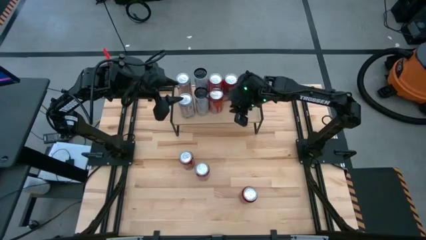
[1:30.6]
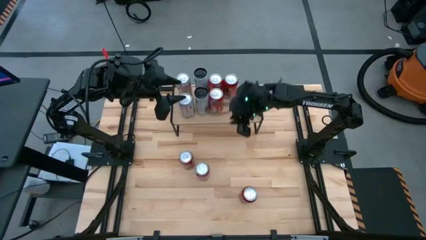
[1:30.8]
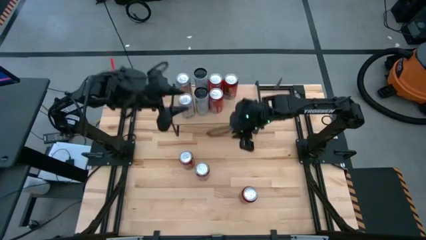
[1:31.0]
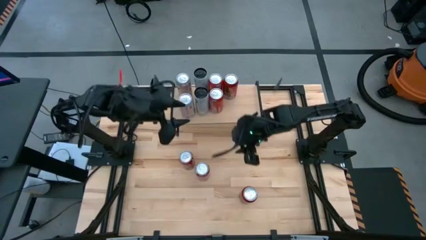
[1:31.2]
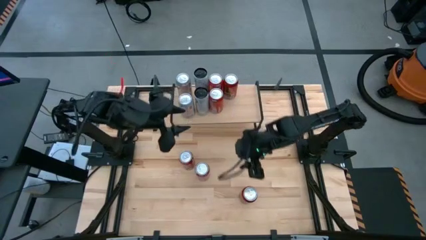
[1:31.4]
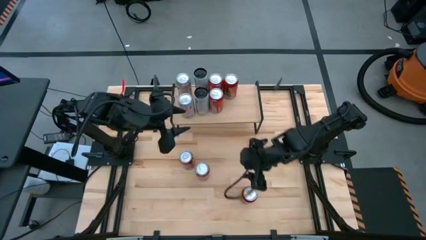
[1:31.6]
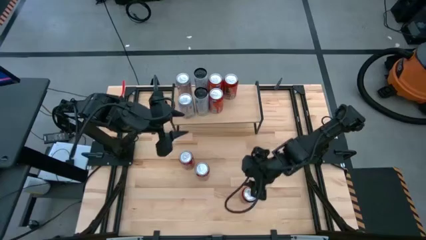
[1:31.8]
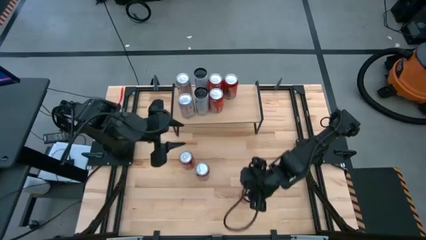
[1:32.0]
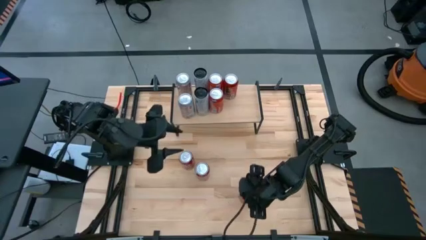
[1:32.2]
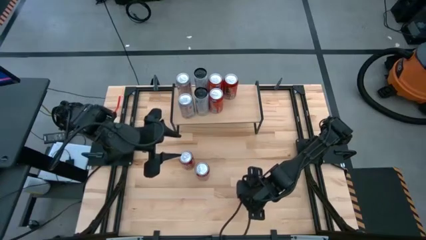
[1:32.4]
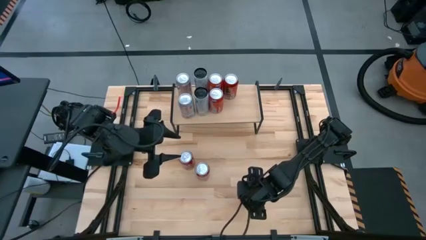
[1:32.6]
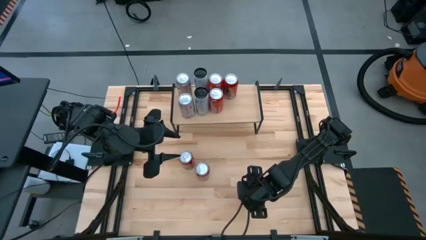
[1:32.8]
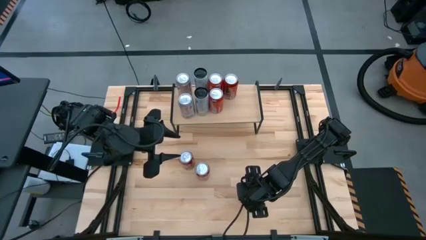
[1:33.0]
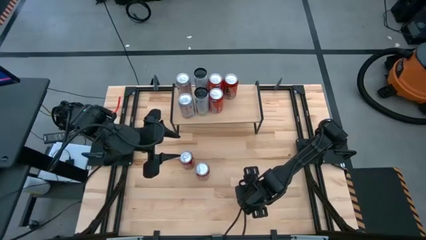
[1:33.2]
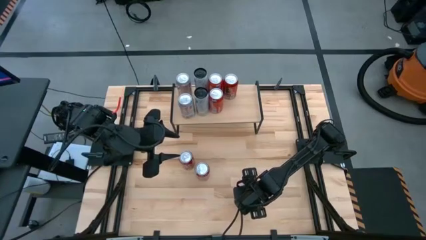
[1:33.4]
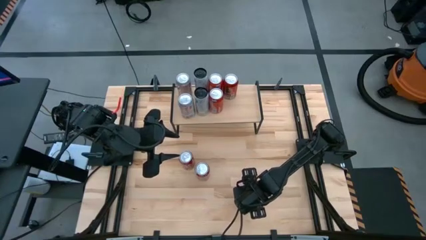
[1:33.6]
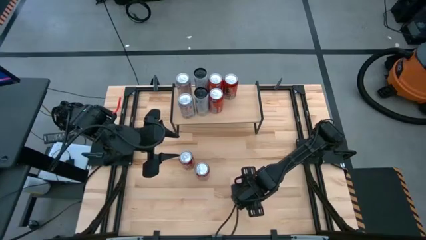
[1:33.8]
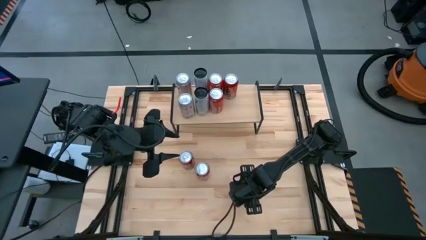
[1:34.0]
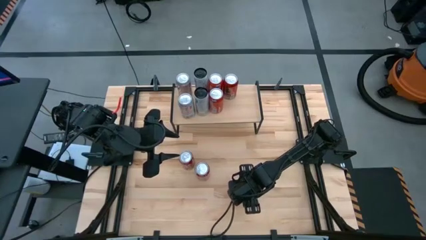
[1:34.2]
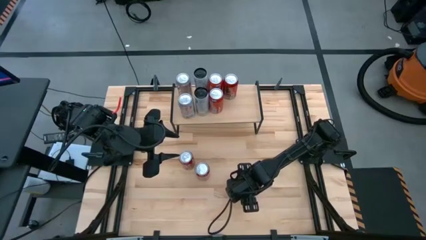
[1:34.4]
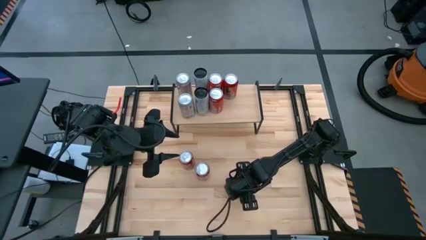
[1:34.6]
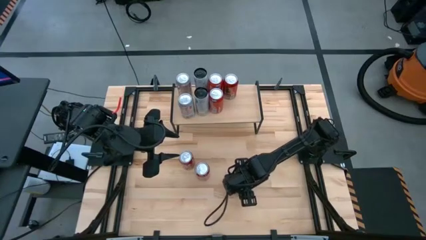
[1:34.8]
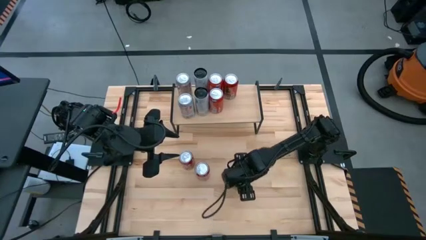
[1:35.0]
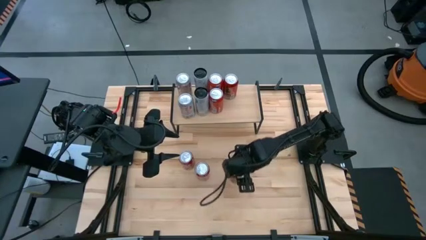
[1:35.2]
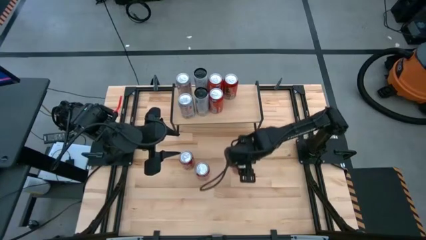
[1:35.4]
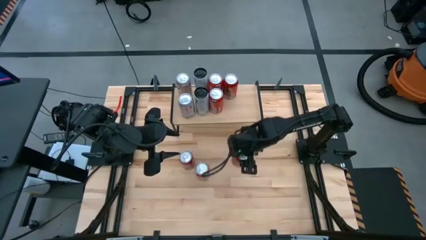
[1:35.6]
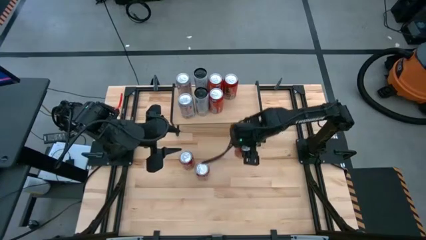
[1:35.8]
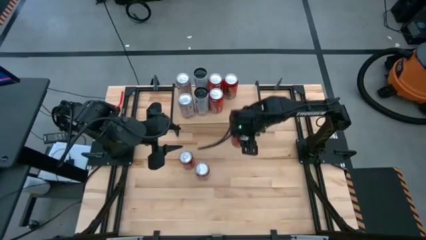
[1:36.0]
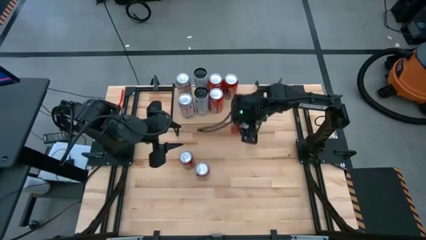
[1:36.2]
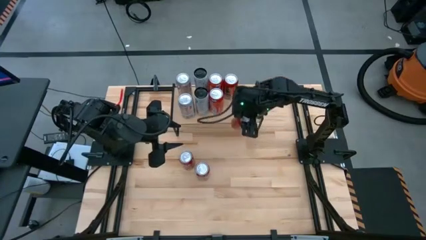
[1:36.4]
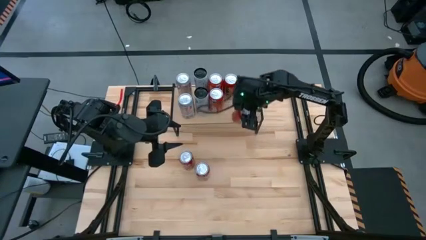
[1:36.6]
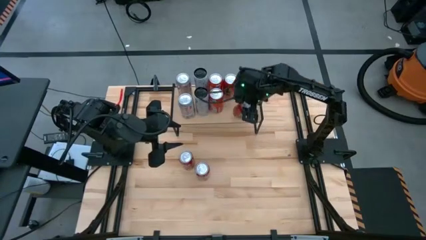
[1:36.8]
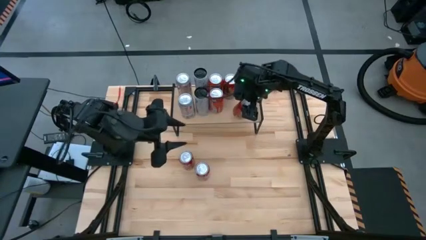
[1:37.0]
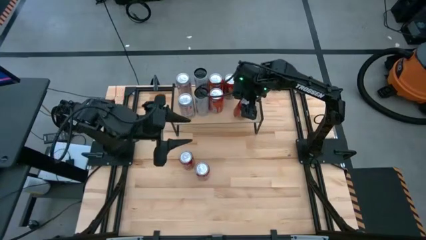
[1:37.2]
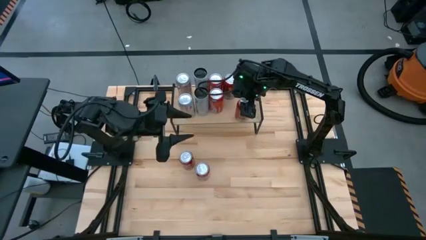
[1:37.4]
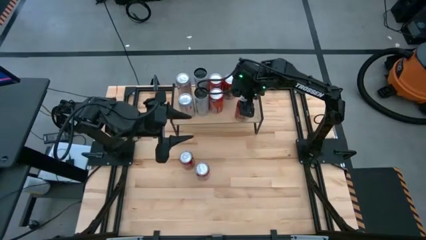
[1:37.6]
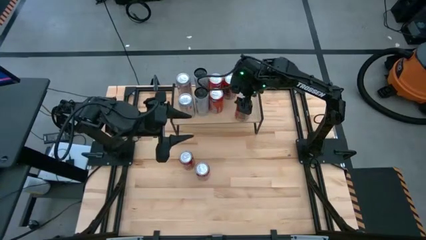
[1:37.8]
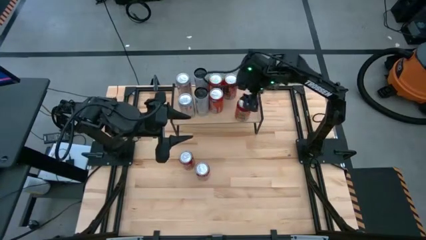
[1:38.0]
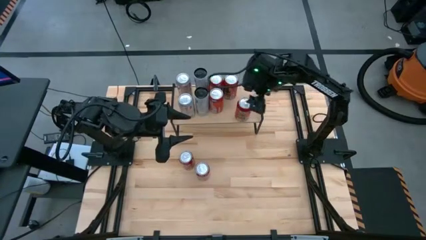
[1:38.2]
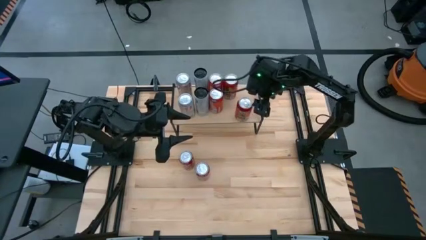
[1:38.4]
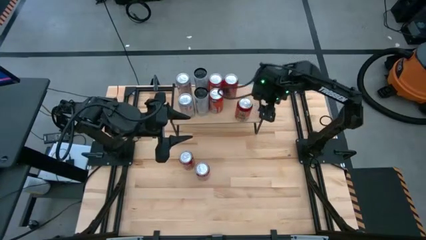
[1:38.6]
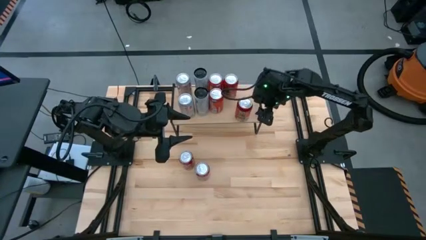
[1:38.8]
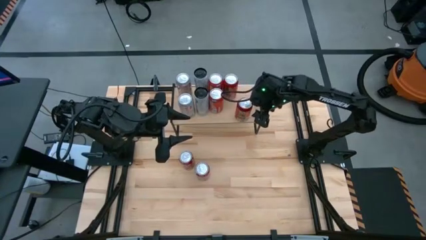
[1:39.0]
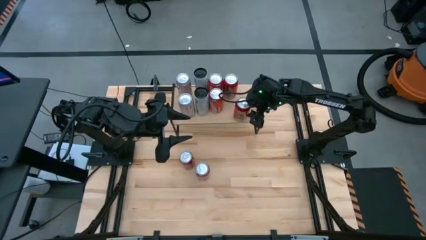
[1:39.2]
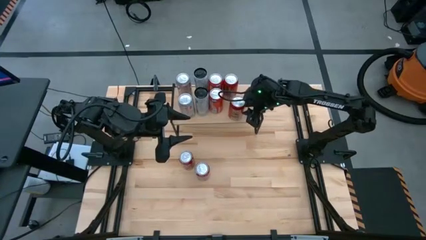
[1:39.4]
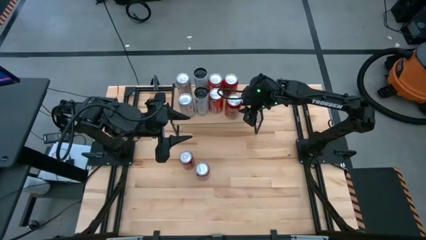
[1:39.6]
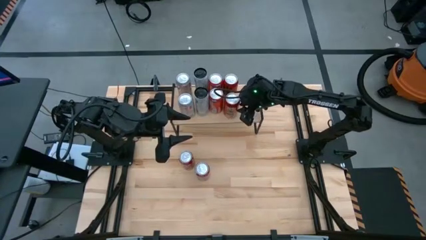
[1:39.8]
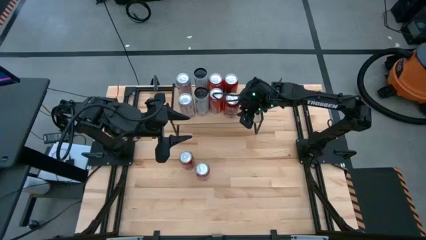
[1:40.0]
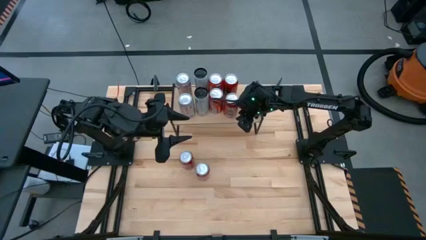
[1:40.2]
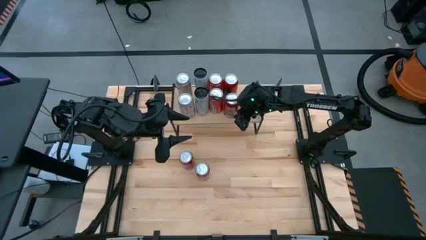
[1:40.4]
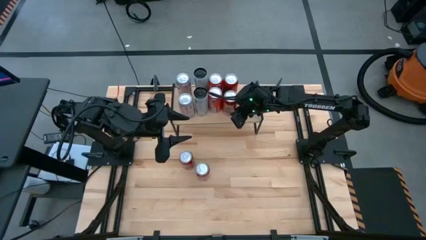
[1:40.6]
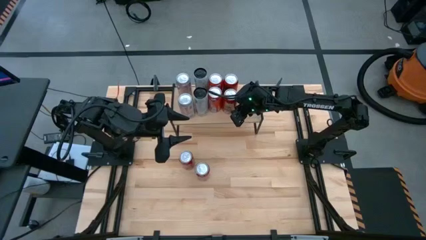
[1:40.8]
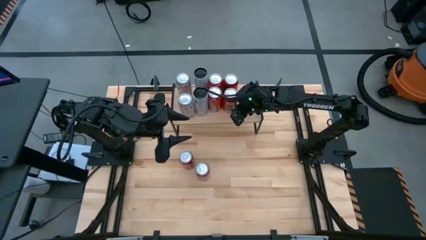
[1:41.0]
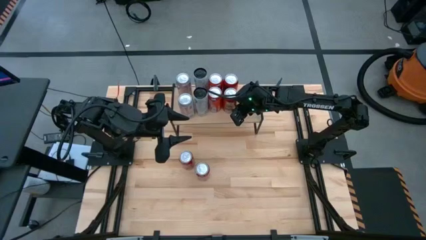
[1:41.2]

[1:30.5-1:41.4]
Task: Place canned beverage on shelf
Put the red and black soda can aligned with the other red and black soda can on the shelf

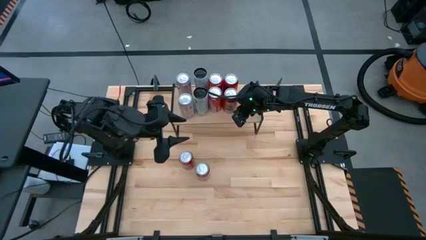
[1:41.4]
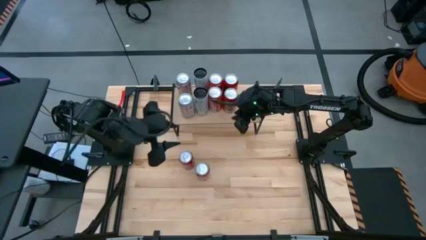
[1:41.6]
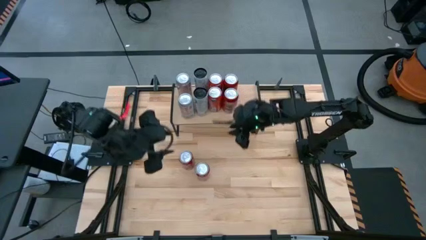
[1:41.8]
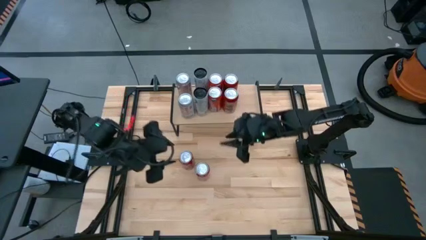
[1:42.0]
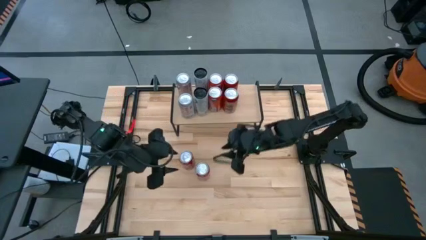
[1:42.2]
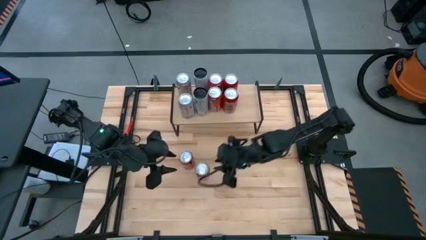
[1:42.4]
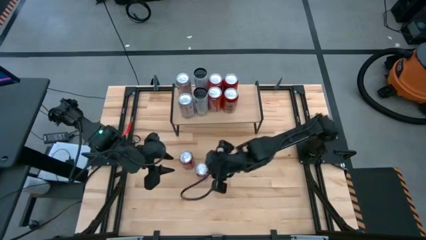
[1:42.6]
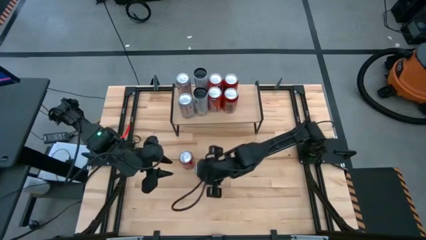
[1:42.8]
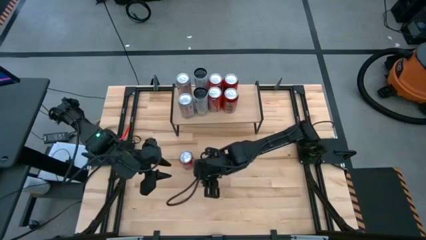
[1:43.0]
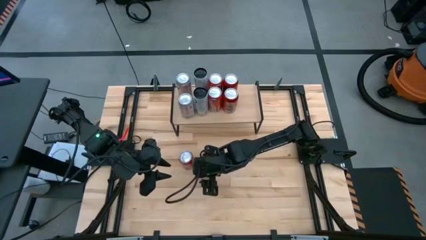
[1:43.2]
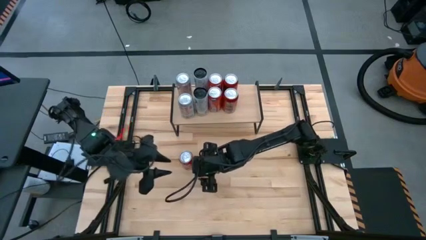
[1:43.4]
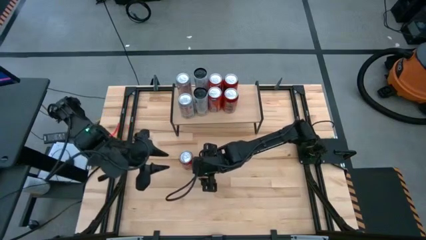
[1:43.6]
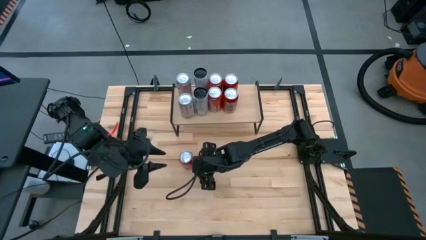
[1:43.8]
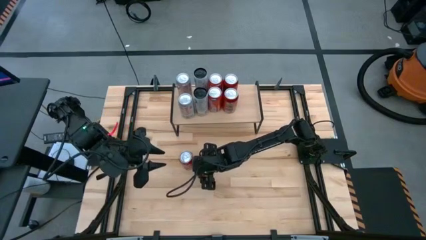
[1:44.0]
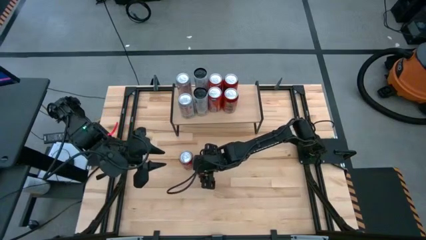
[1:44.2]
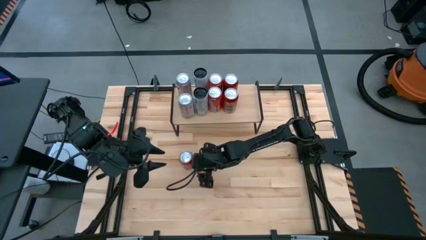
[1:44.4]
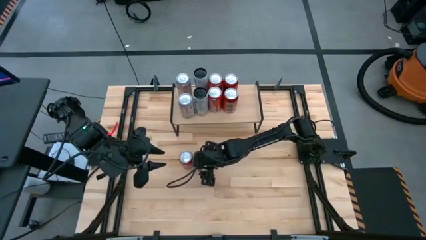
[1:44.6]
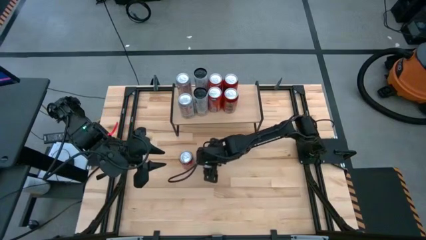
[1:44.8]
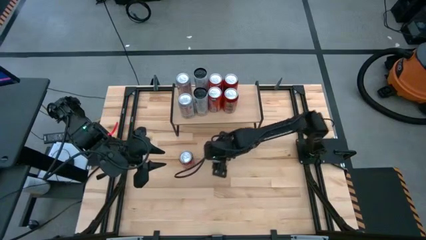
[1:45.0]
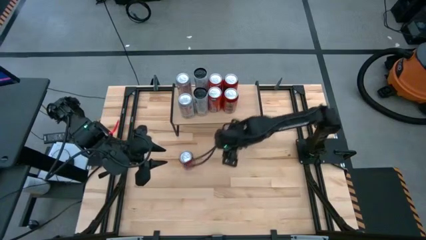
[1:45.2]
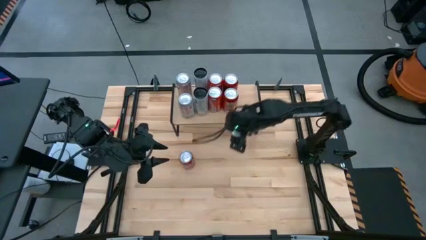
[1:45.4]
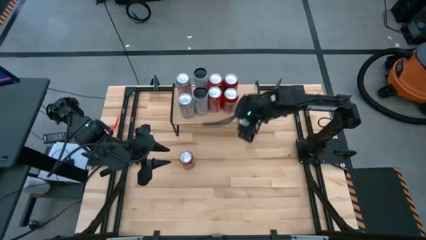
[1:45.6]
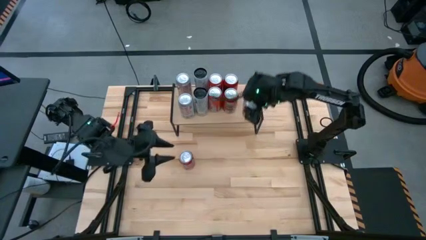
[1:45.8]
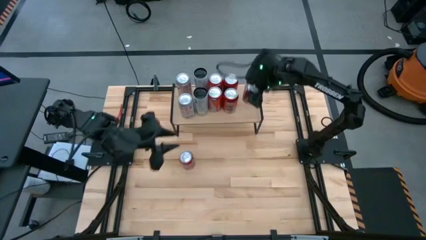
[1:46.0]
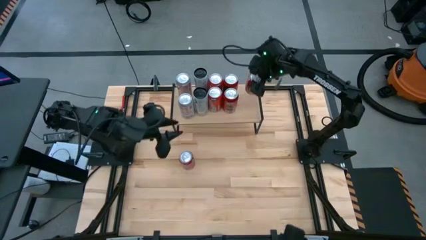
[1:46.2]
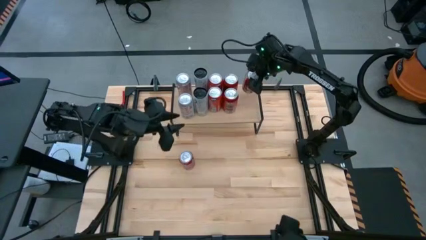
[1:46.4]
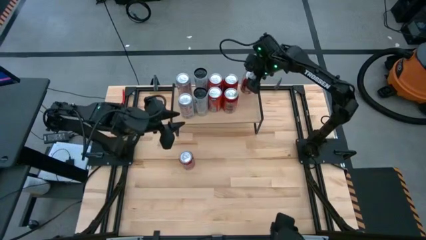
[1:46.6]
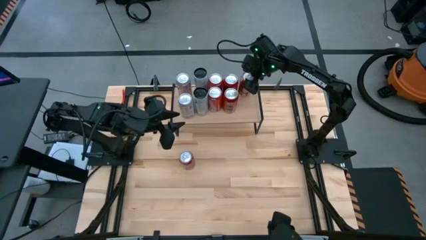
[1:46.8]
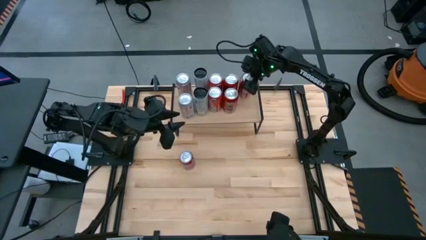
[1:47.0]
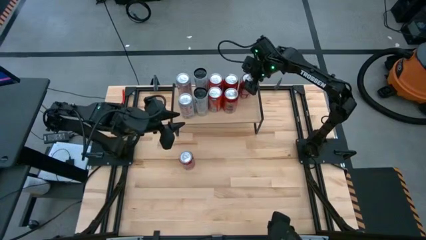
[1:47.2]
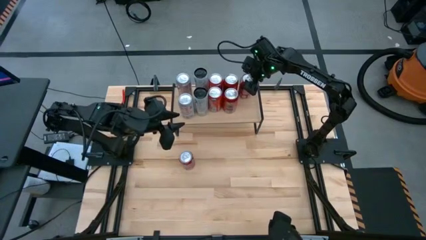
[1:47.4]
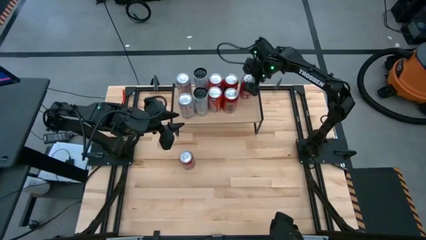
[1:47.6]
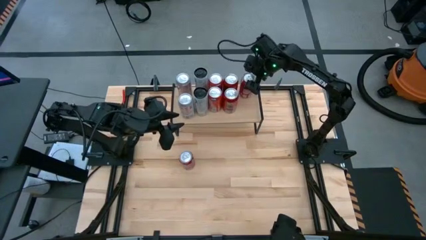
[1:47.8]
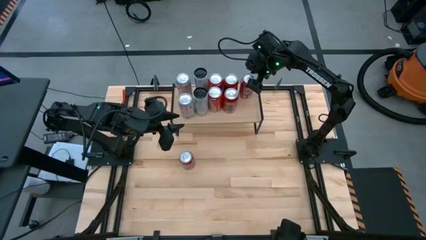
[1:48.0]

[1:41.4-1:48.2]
Put the bottom red and white soda can on the shelf
